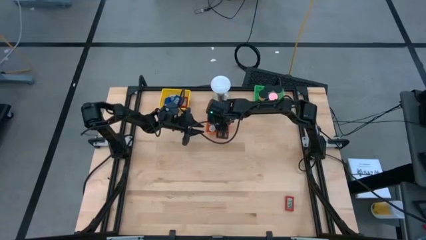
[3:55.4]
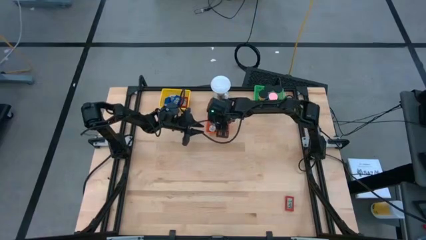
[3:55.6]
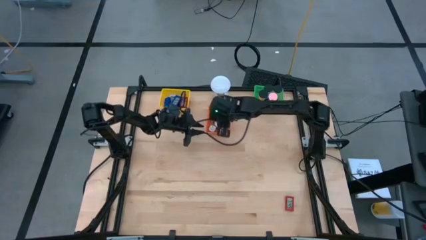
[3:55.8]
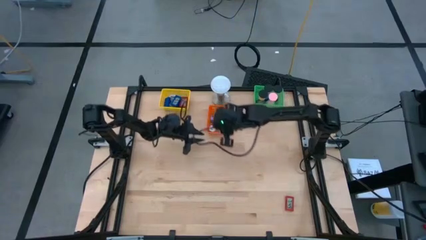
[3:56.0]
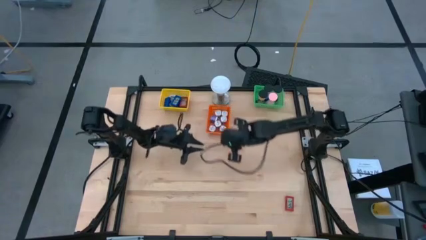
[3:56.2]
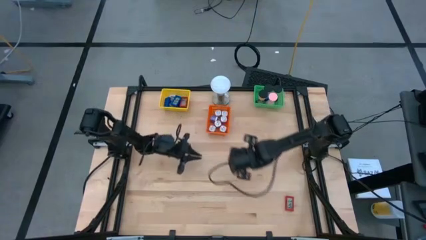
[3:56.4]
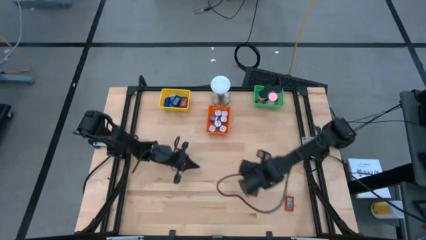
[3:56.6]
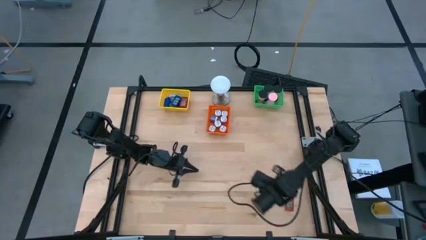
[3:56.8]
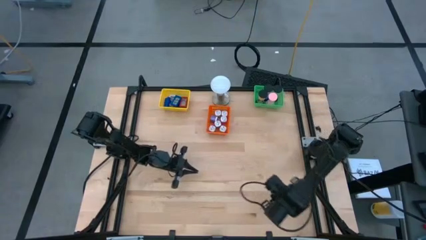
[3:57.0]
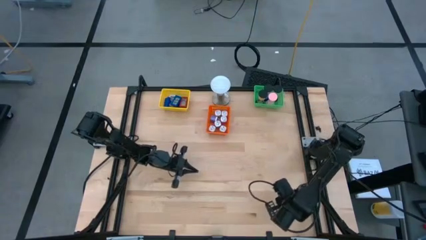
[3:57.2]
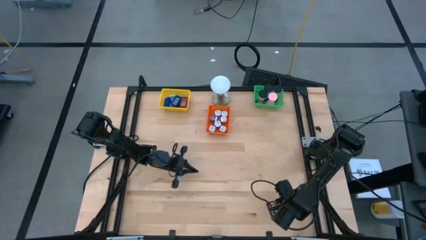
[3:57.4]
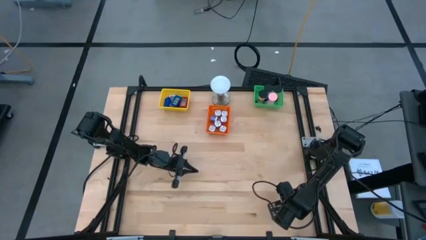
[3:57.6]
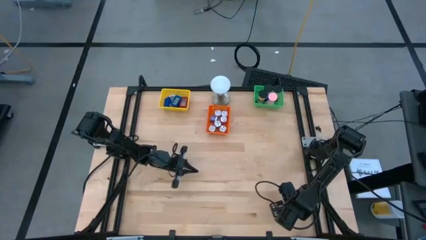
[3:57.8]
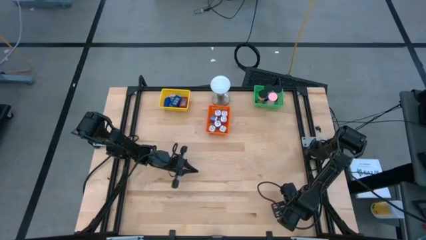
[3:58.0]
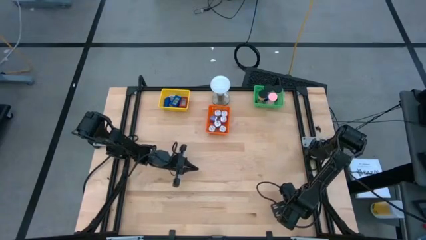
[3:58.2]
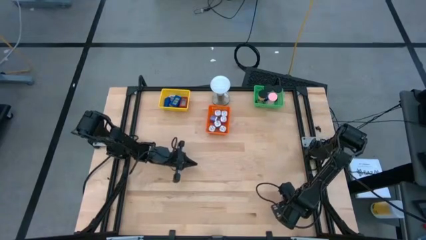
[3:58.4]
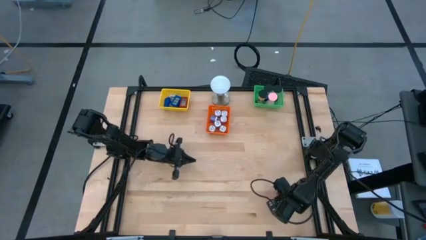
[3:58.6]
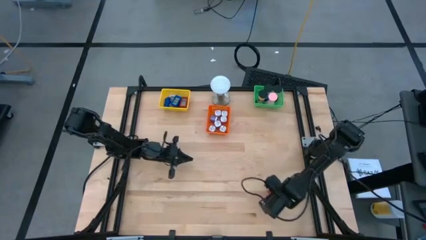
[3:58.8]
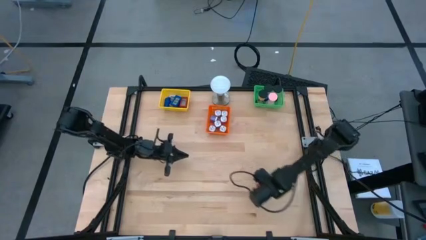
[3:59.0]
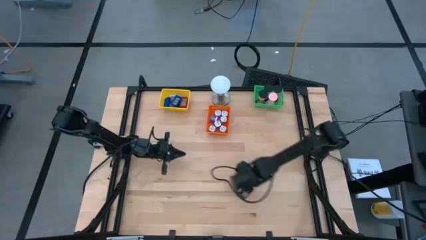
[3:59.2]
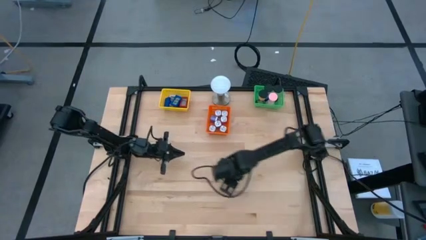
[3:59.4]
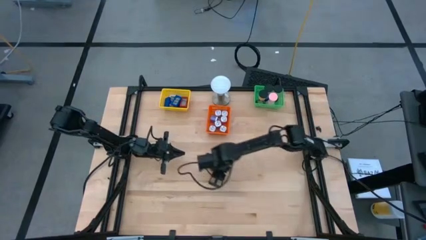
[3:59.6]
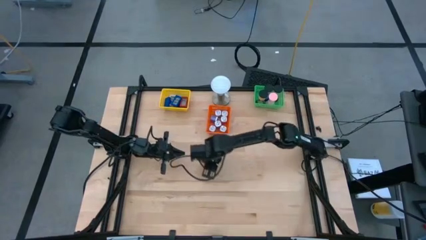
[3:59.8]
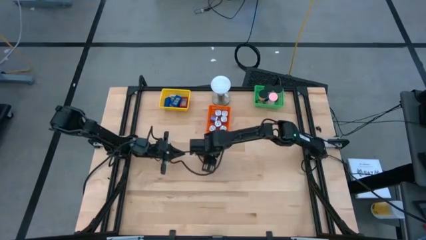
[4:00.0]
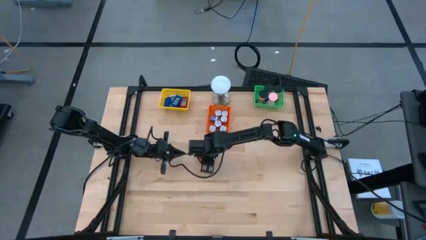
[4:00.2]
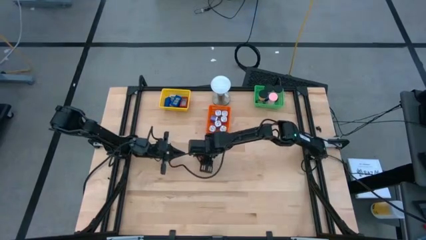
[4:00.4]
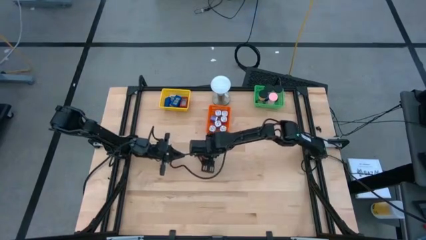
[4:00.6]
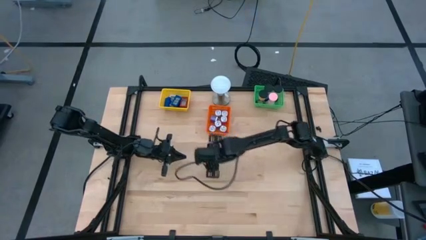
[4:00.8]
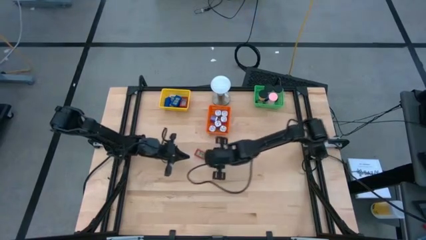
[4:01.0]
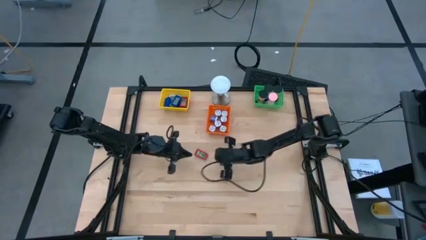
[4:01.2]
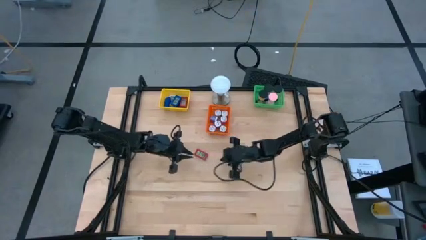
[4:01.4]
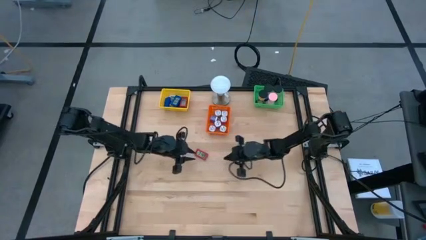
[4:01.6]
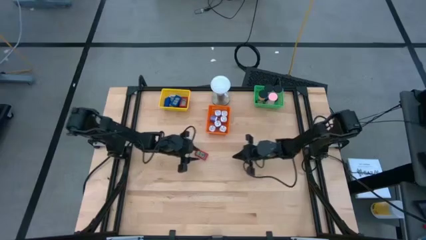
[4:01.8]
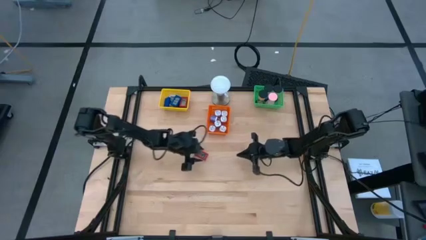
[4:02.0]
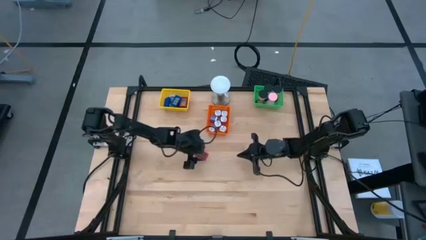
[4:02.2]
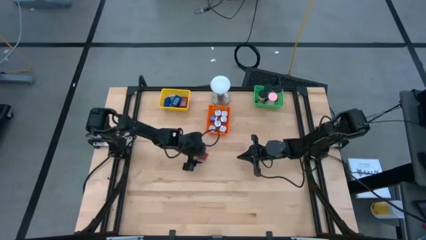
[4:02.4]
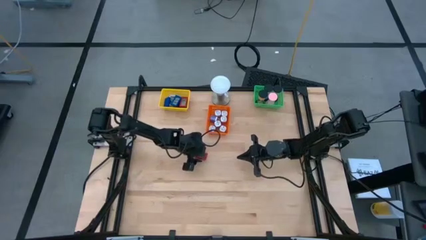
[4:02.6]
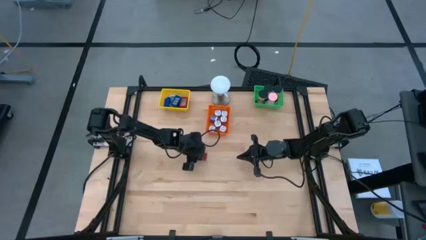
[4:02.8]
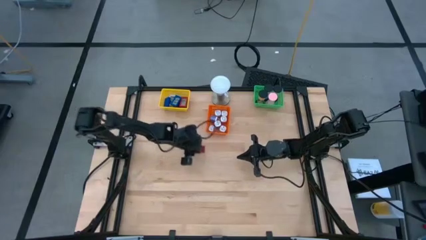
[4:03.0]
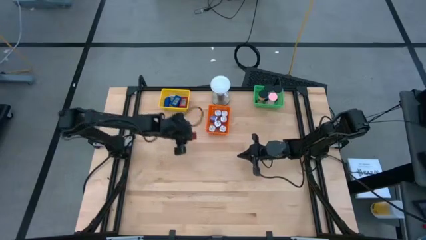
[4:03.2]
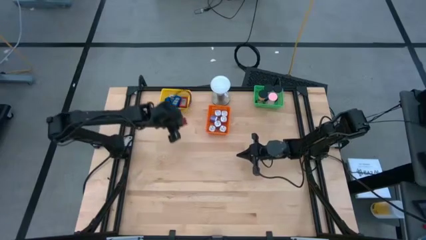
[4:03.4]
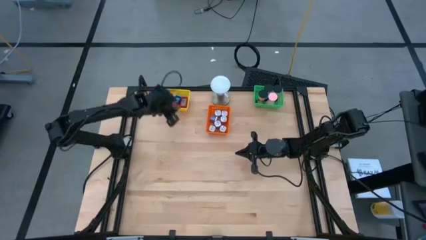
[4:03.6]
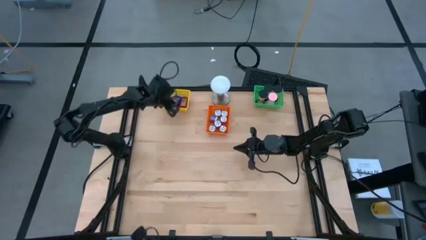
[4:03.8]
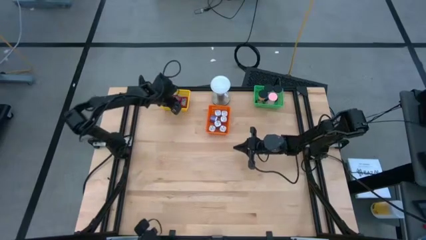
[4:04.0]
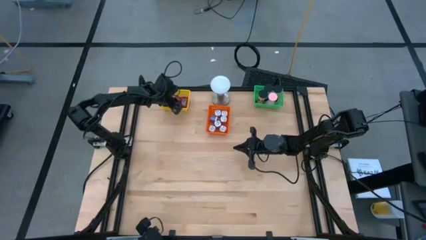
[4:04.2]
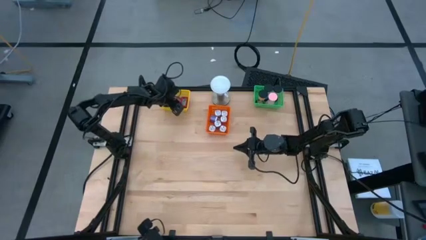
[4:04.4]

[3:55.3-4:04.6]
Task: Pick & Place Office items
Put the red digital clock into the yellow bin

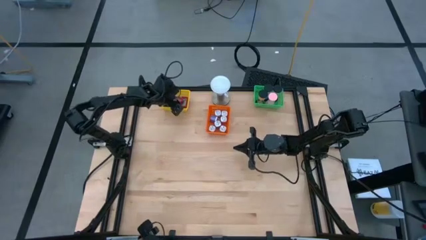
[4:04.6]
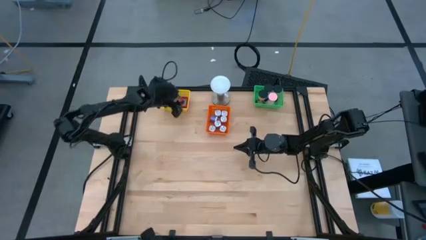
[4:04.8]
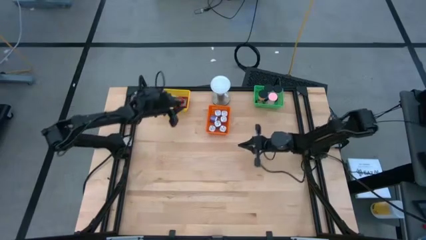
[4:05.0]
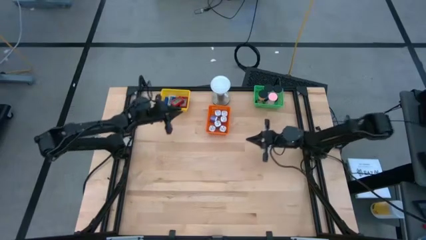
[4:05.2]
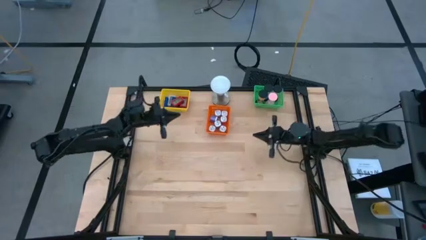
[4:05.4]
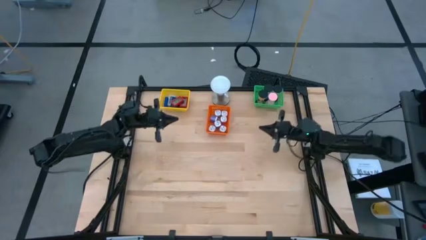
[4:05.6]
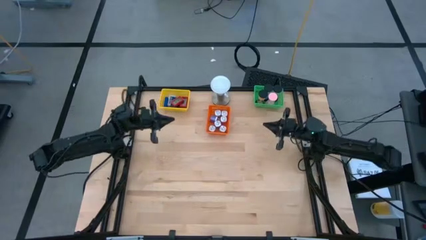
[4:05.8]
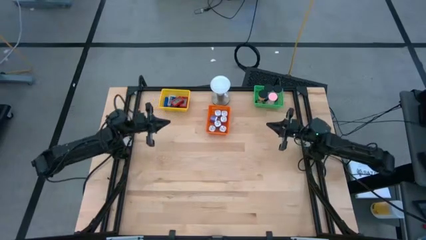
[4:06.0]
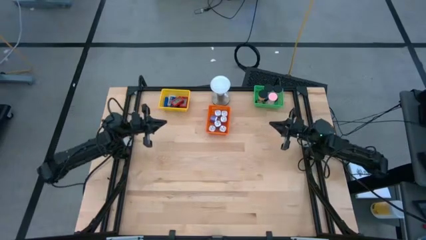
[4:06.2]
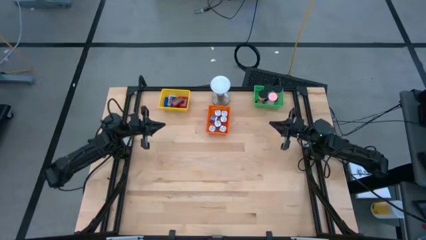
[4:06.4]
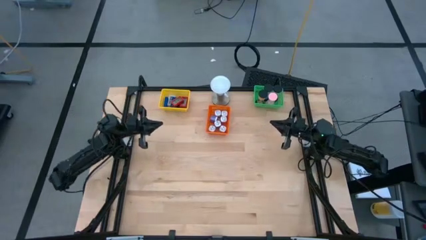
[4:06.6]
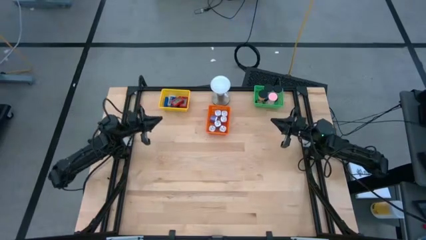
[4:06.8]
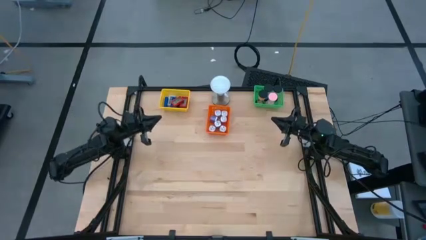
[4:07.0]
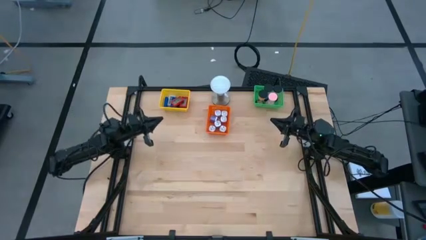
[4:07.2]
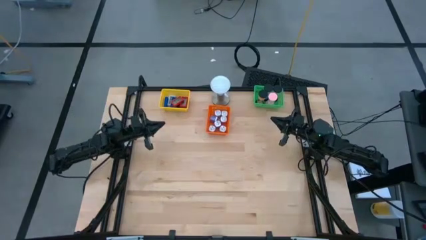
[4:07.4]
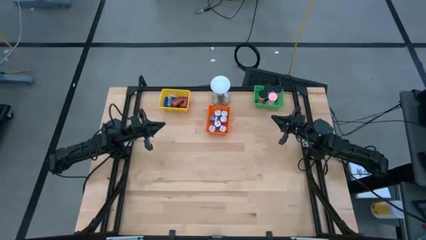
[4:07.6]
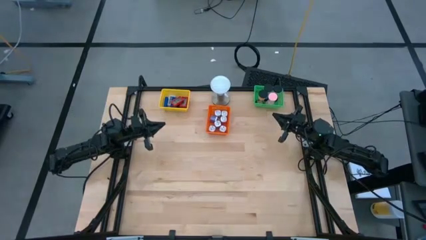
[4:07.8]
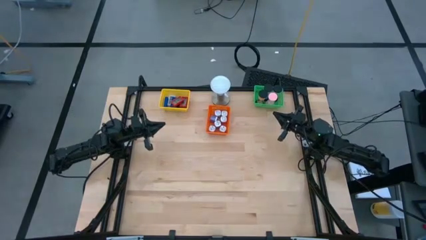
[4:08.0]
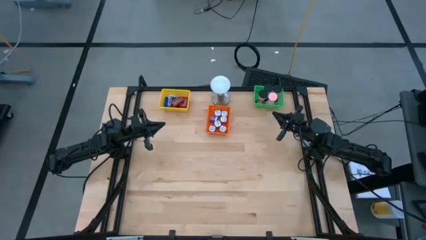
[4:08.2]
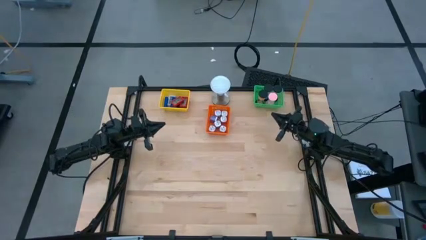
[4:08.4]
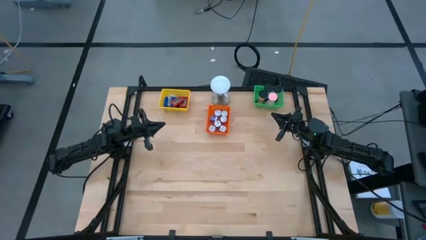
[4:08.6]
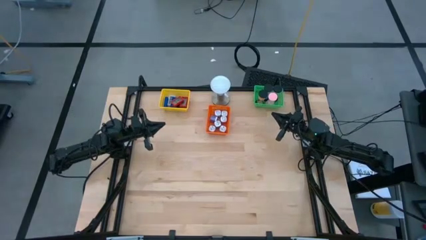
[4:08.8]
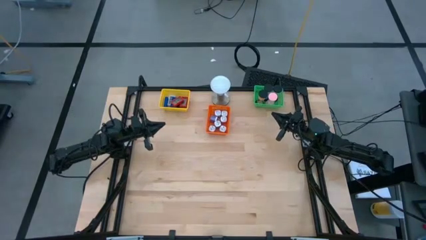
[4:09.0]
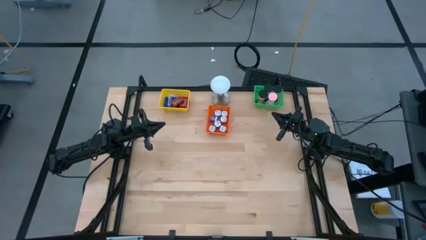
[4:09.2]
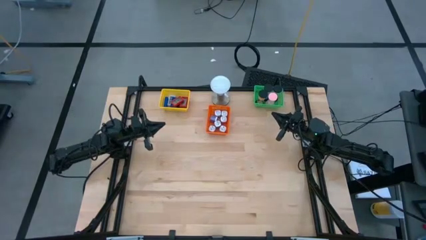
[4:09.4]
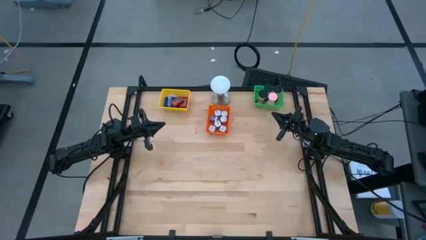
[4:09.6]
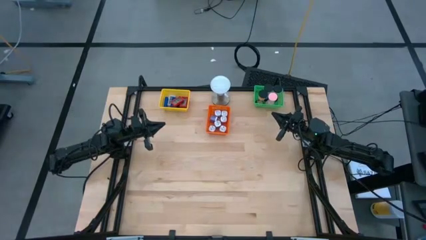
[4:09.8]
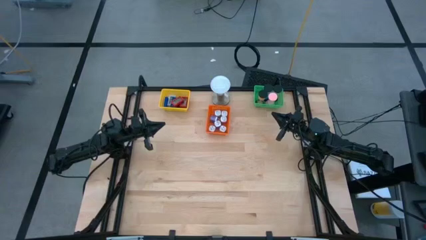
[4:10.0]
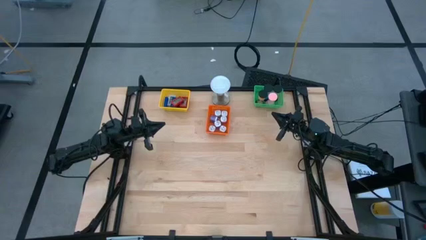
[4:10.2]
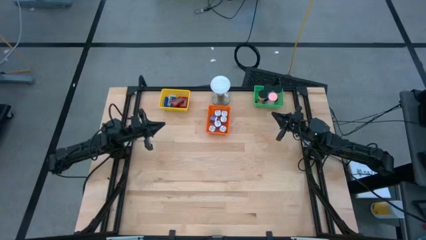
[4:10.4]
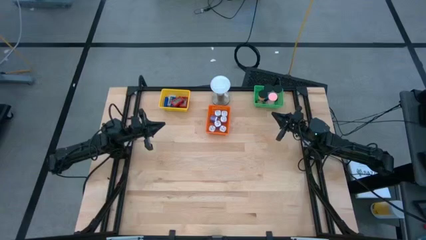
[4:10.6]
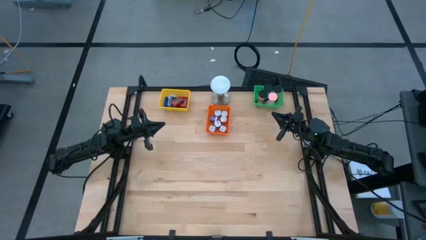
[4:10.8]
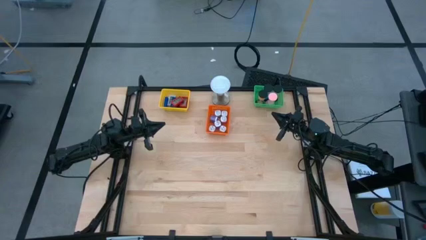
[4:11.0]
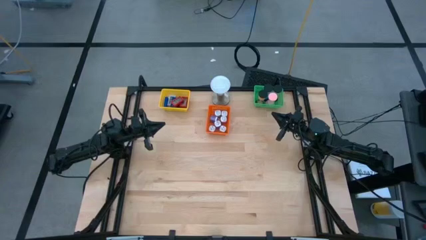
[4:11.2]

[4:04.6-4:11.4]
Return to Home Position
